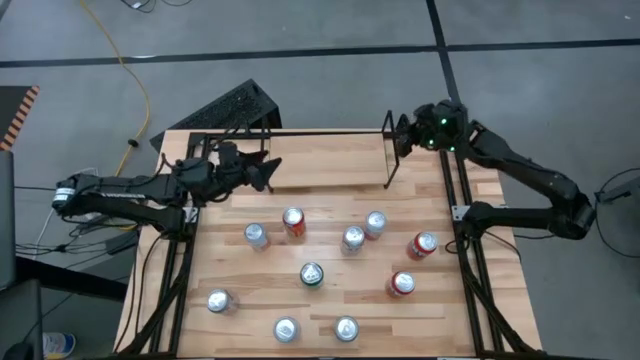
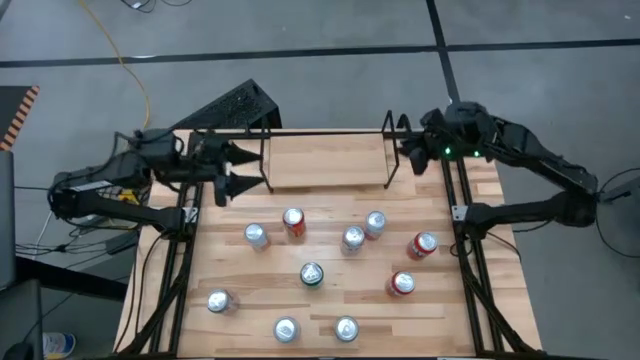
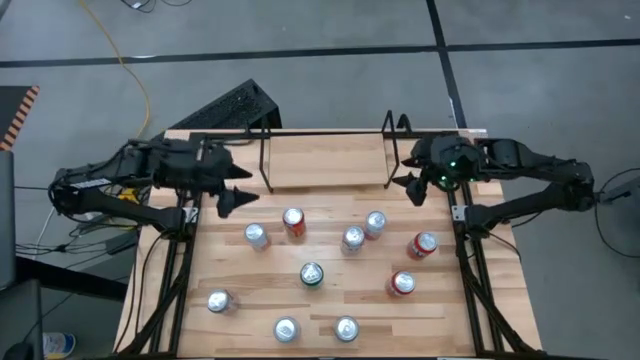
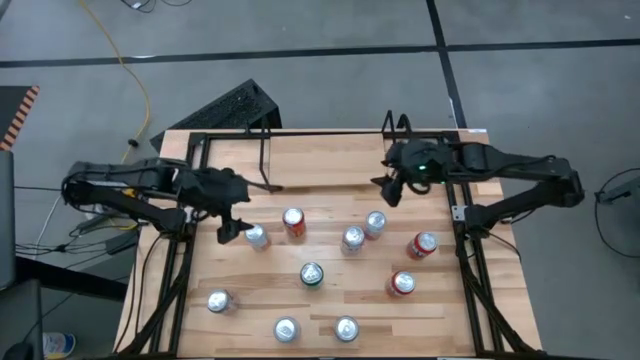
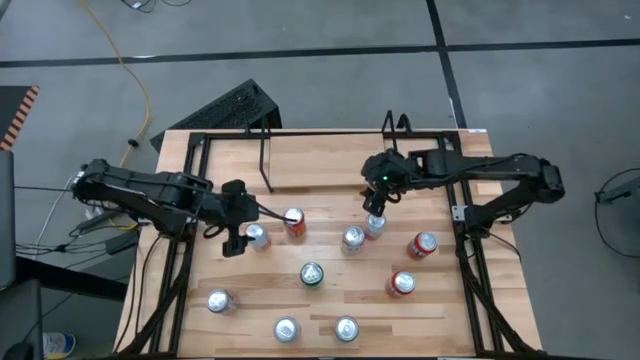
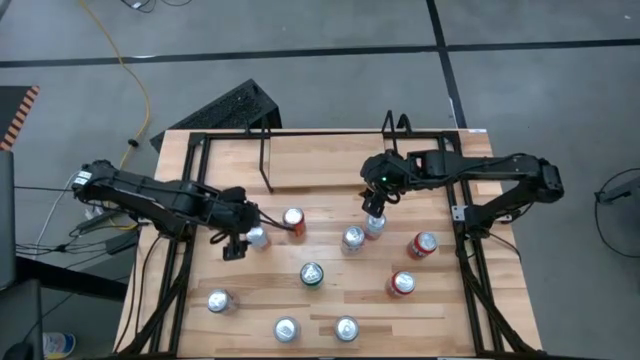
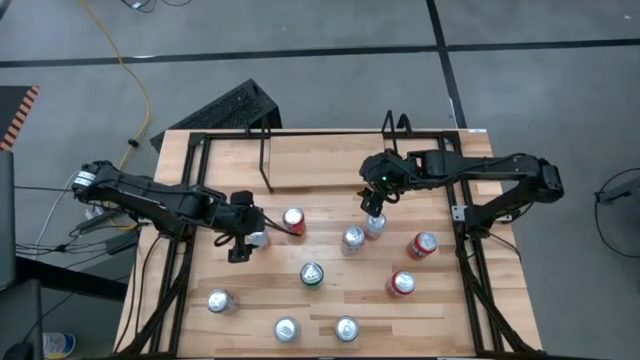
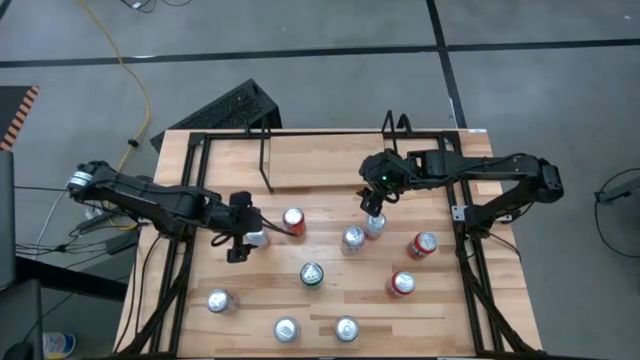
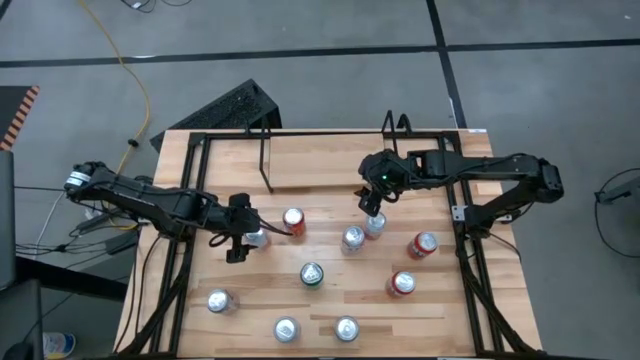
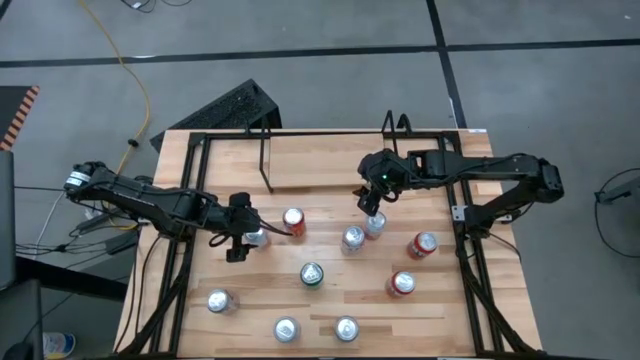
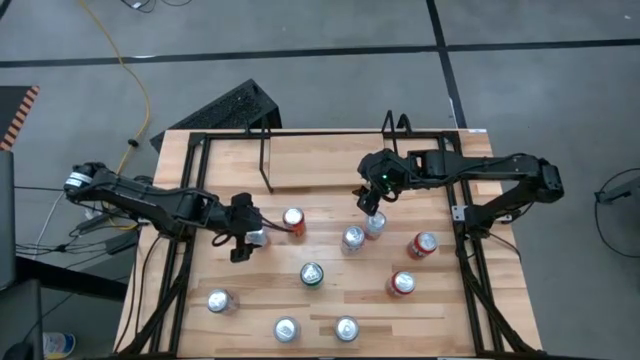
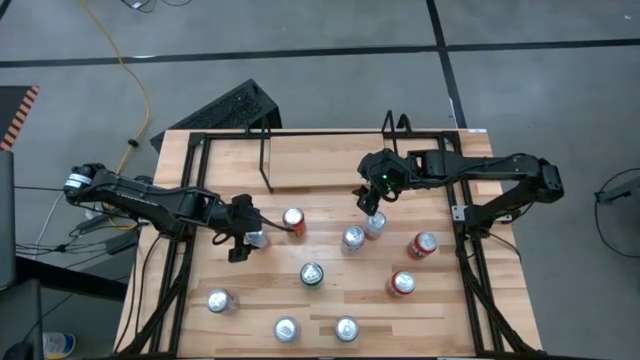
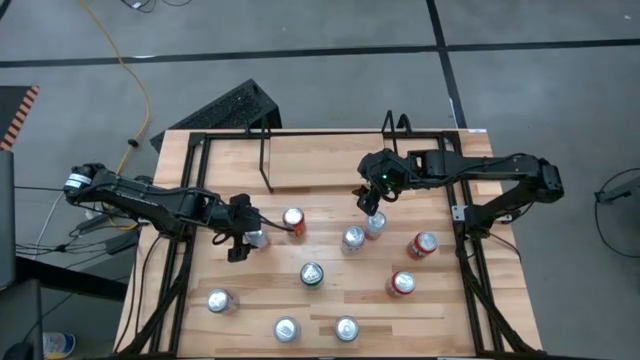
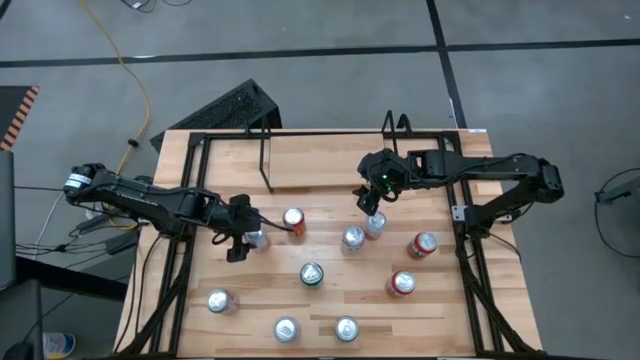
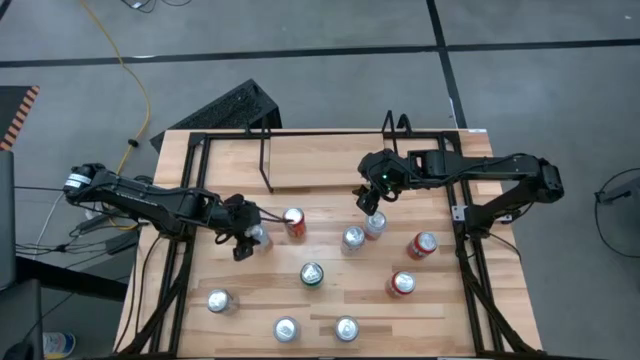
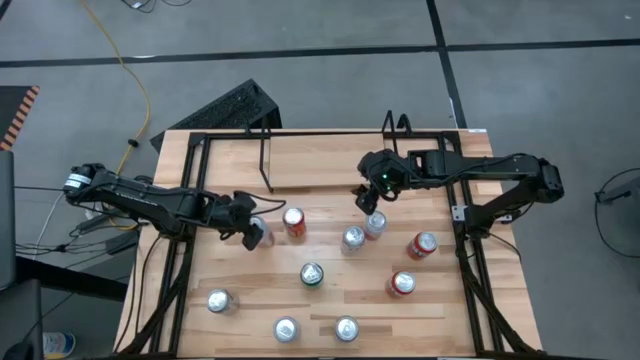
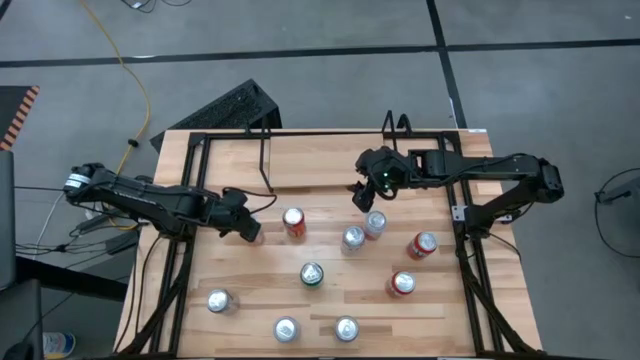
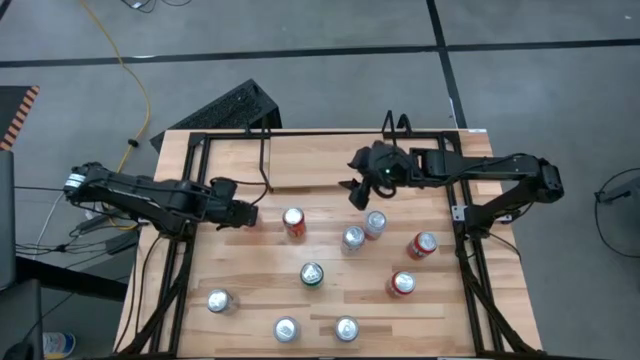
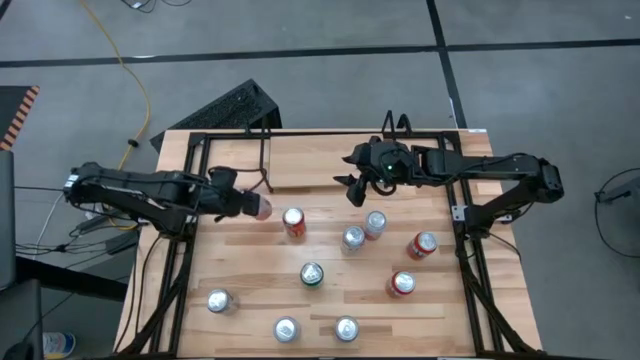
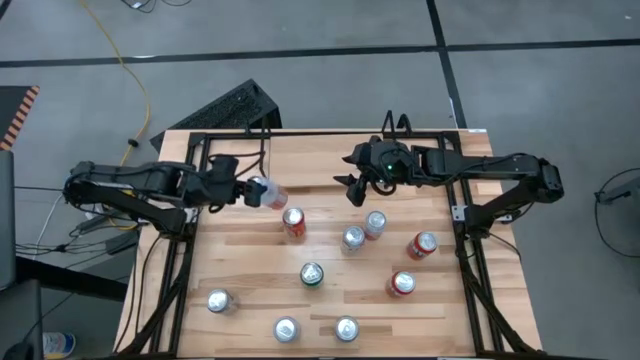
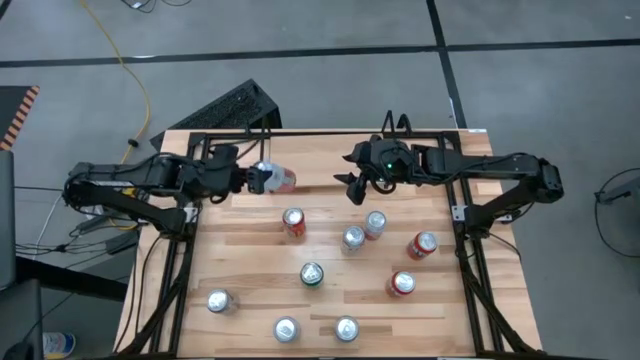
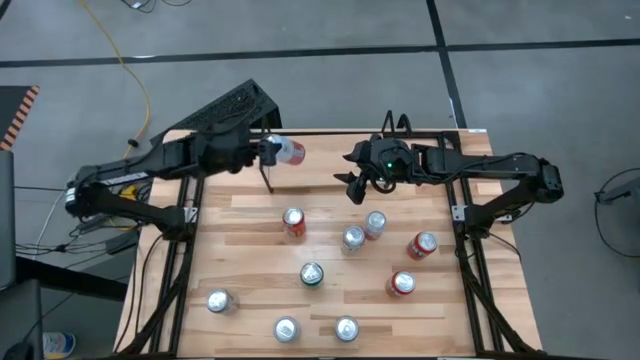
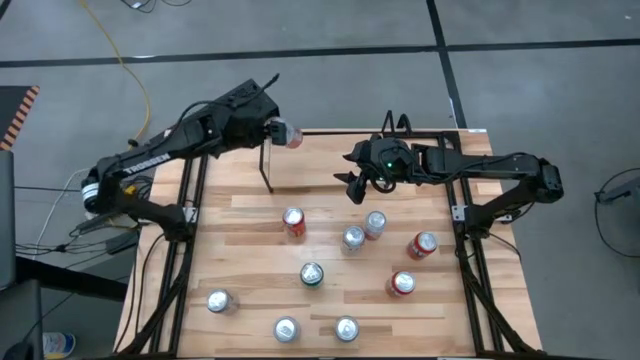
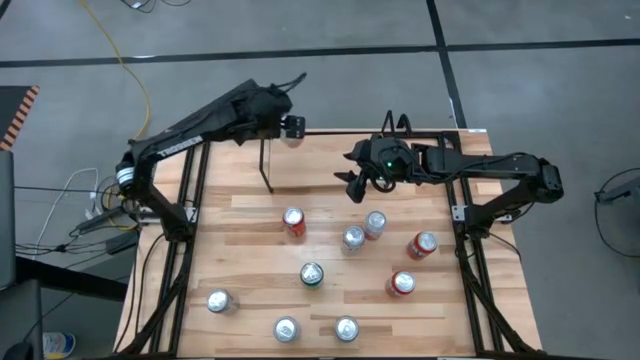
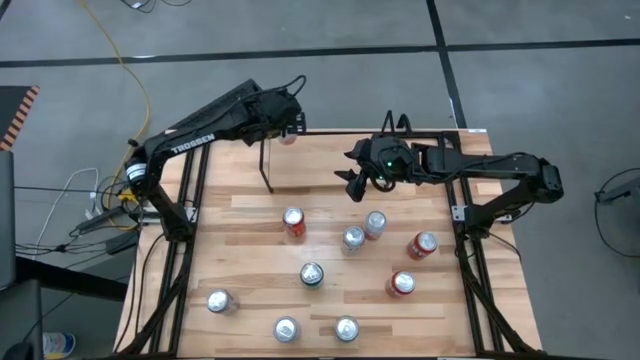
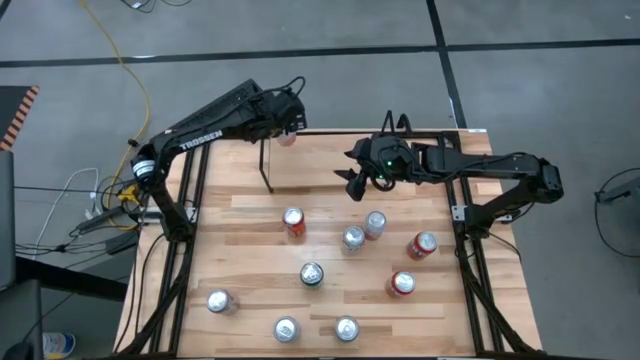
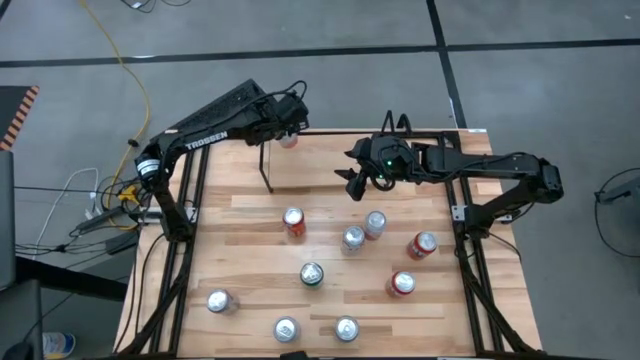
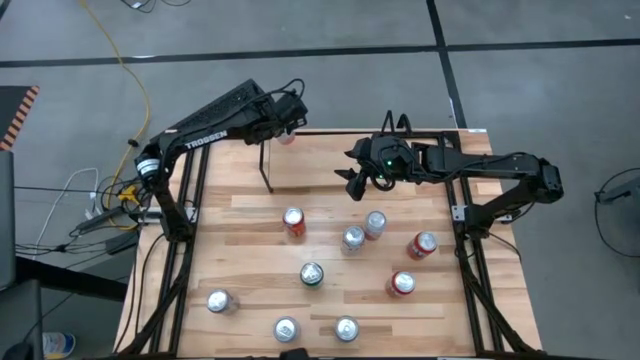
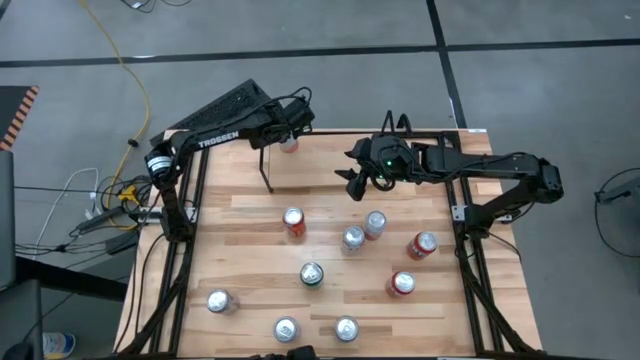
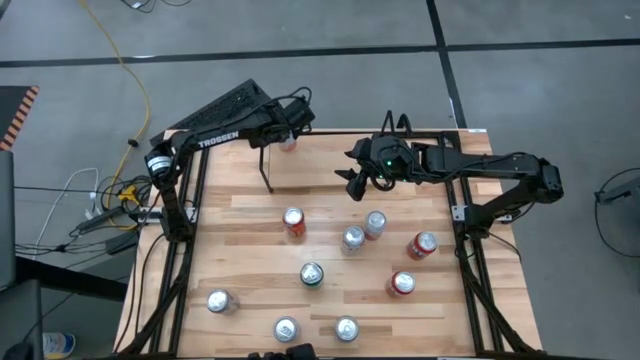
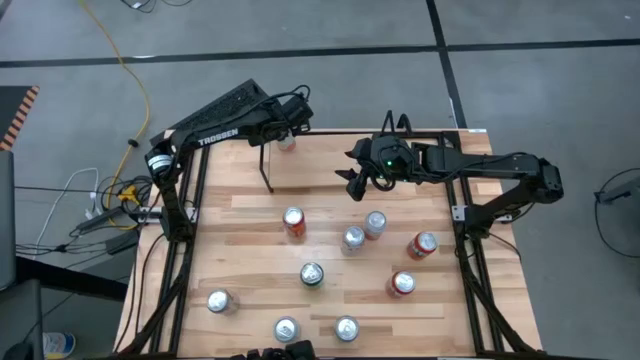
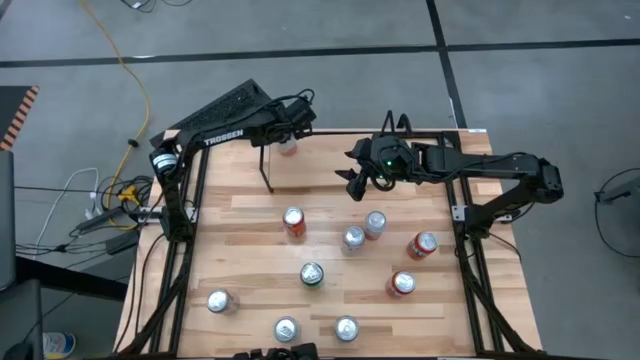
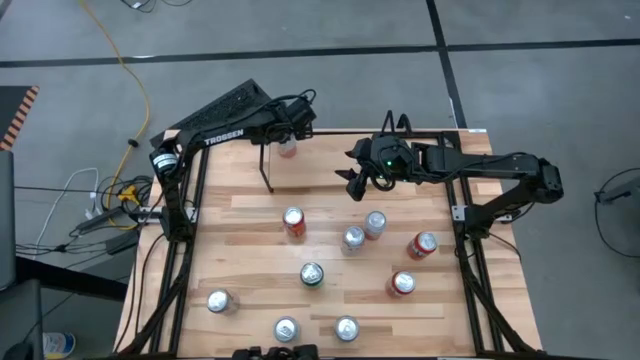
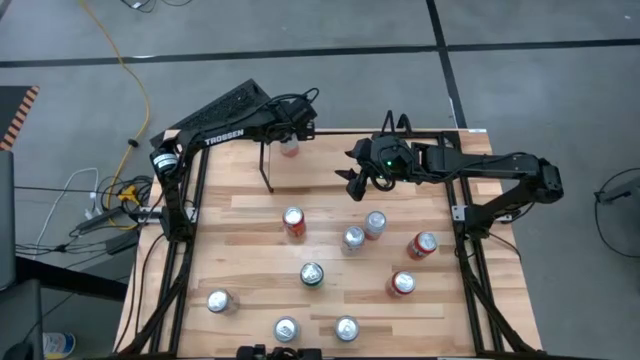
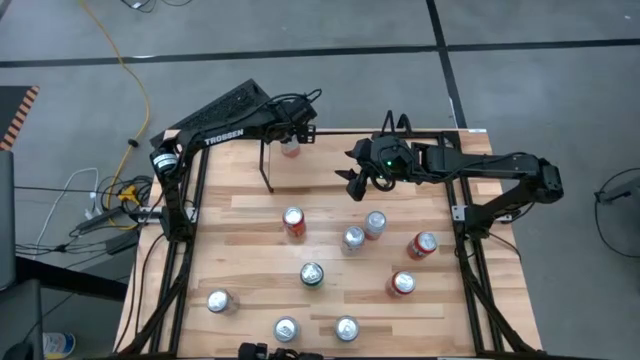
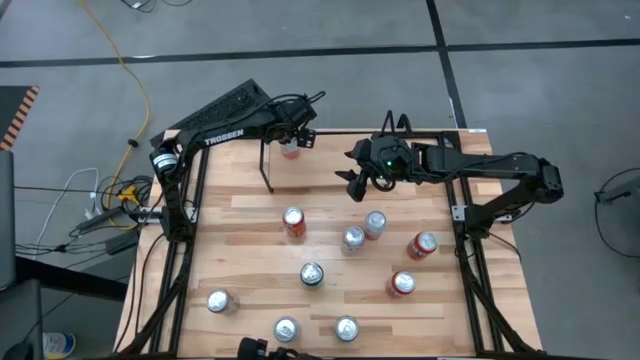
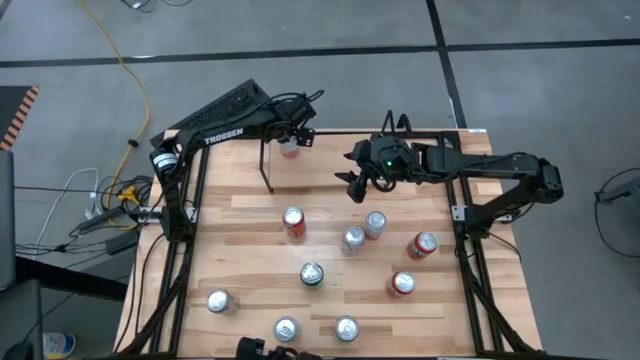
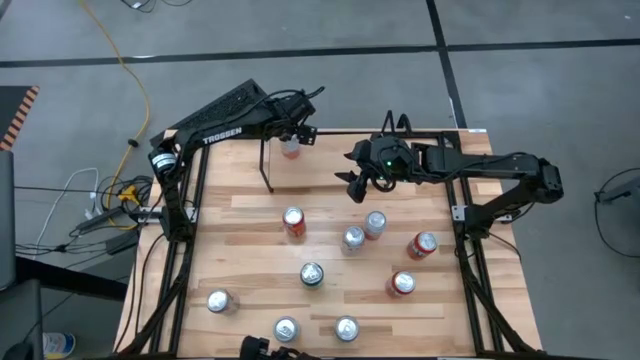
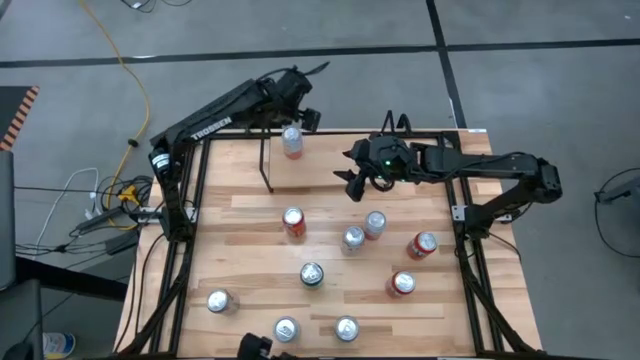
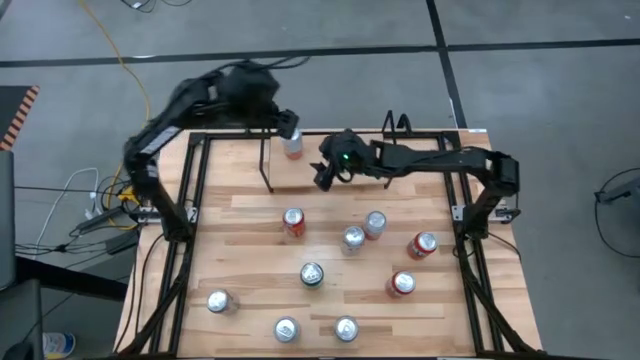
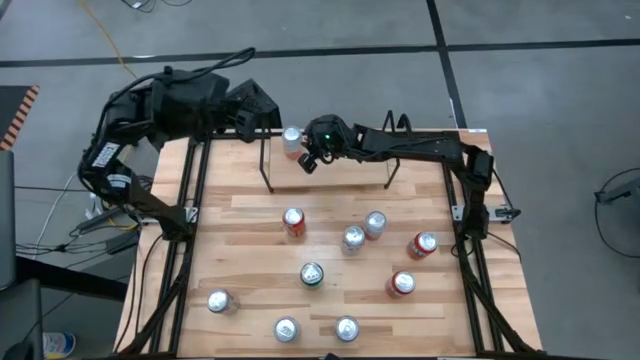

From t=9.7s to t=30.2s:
Task: Place canned beverage on shelf
Put the top left white orange soda can on the shelf
